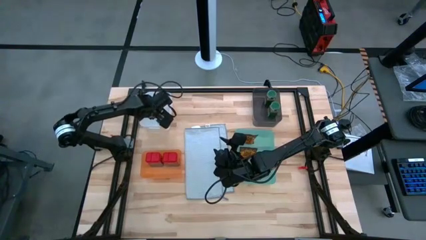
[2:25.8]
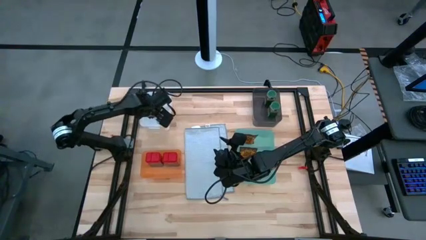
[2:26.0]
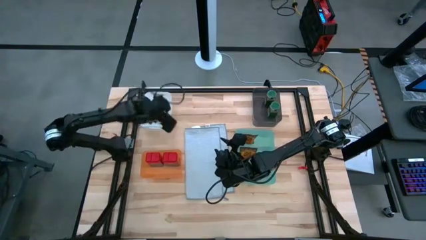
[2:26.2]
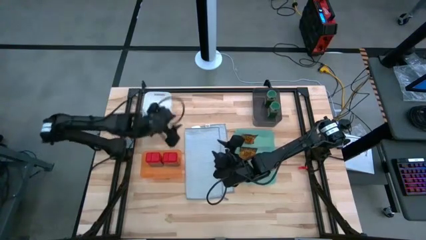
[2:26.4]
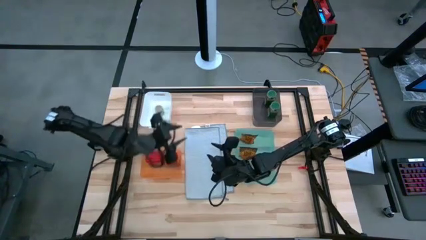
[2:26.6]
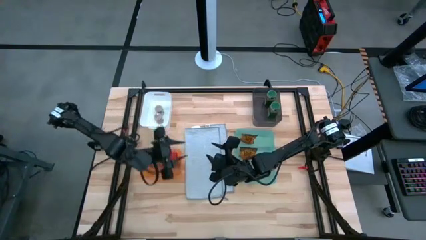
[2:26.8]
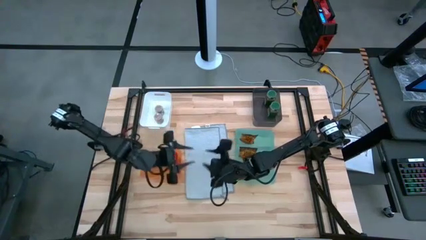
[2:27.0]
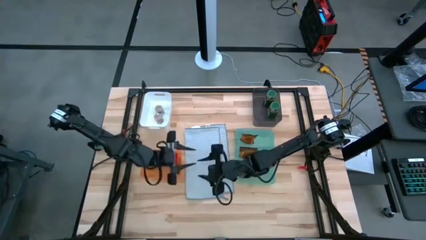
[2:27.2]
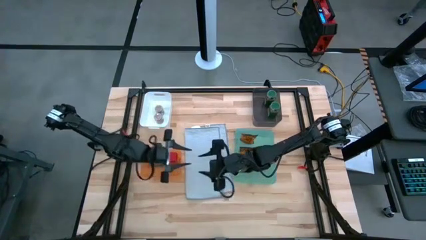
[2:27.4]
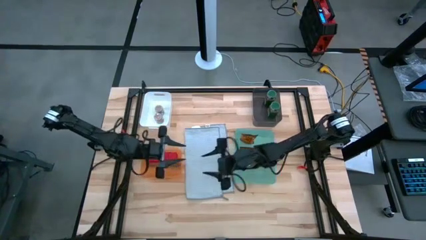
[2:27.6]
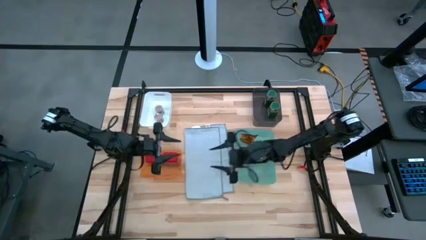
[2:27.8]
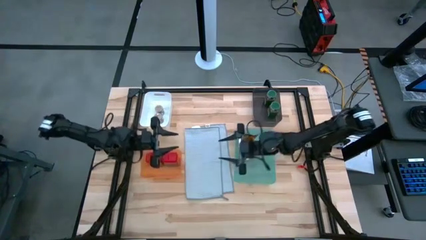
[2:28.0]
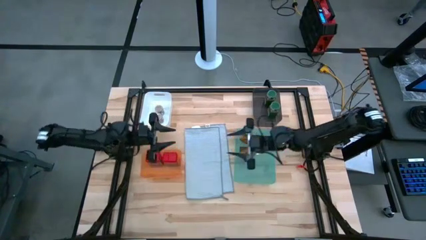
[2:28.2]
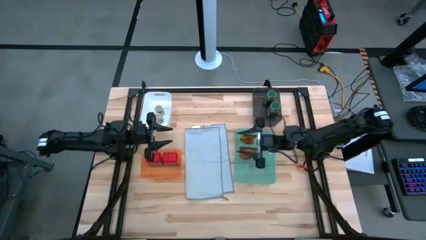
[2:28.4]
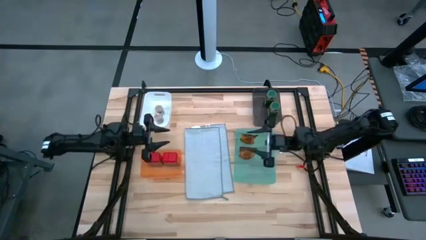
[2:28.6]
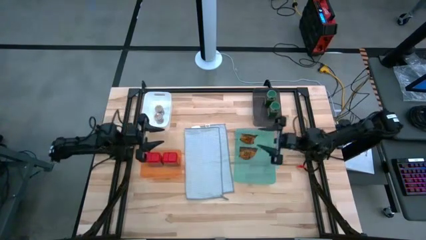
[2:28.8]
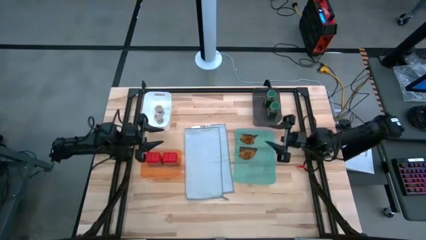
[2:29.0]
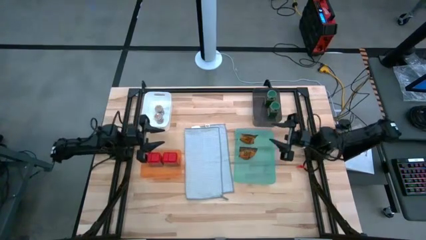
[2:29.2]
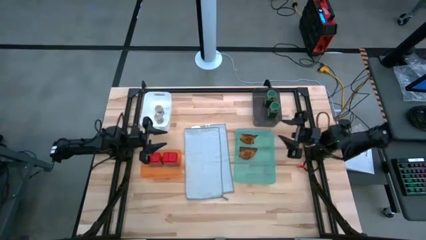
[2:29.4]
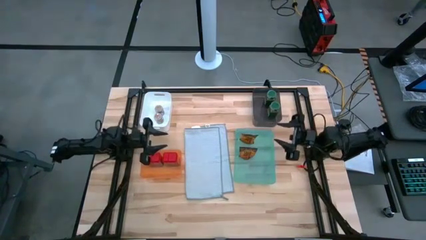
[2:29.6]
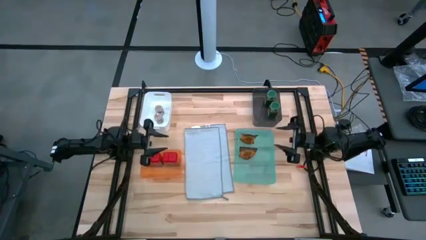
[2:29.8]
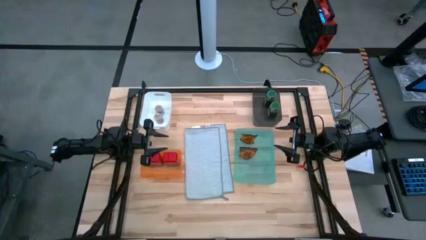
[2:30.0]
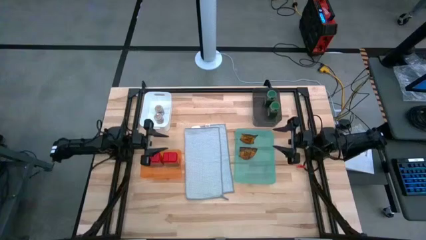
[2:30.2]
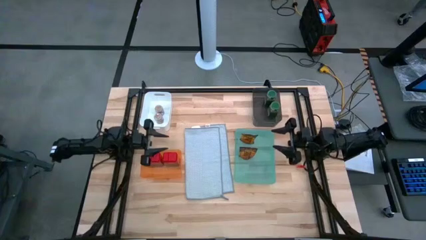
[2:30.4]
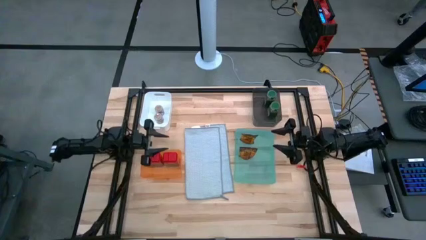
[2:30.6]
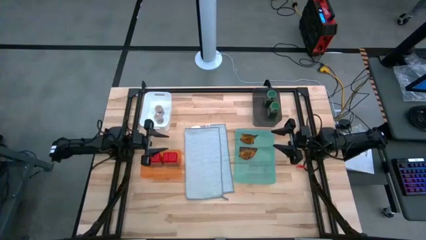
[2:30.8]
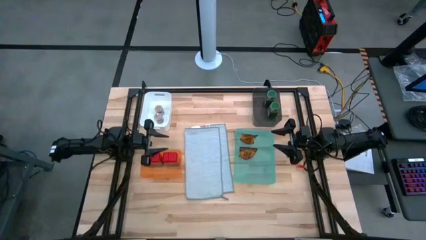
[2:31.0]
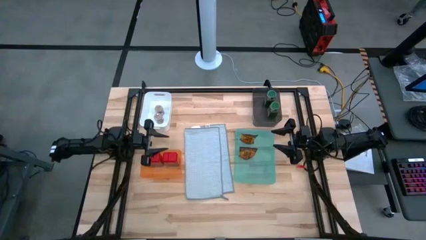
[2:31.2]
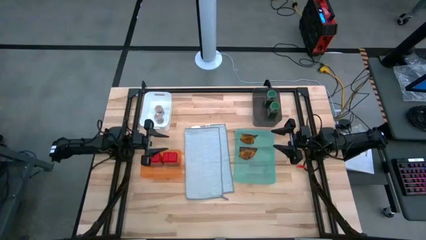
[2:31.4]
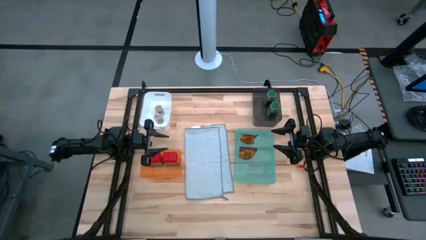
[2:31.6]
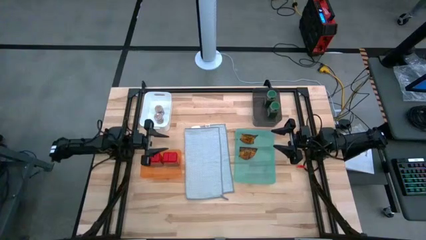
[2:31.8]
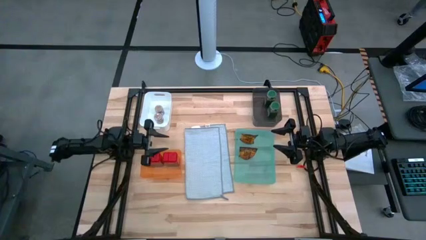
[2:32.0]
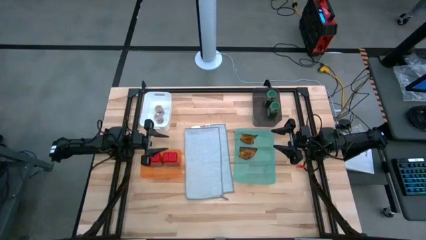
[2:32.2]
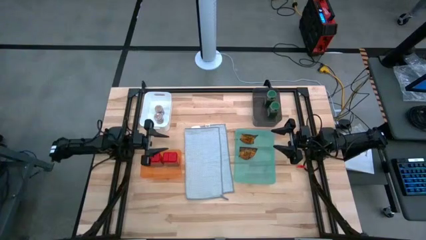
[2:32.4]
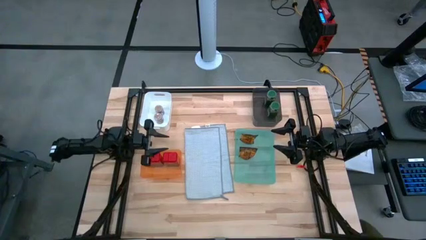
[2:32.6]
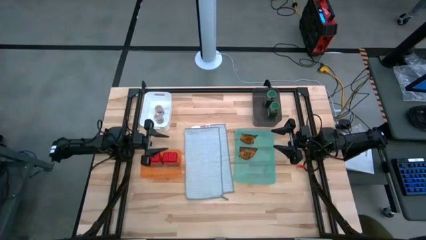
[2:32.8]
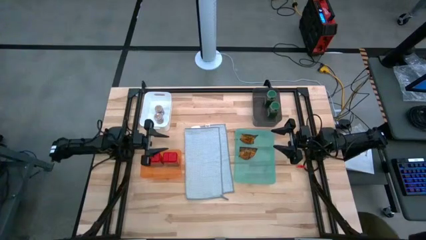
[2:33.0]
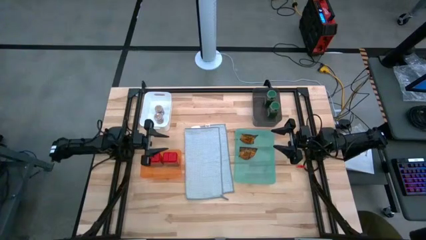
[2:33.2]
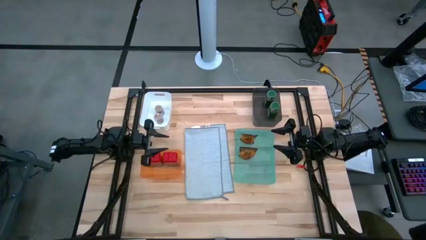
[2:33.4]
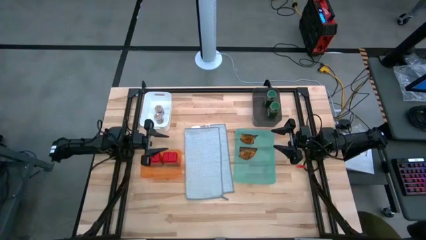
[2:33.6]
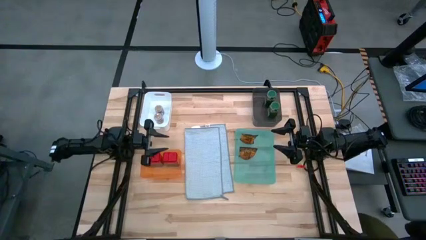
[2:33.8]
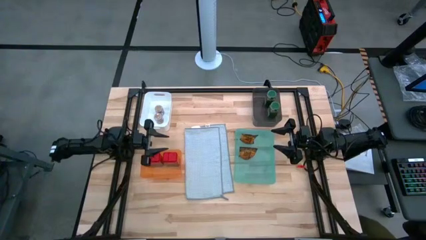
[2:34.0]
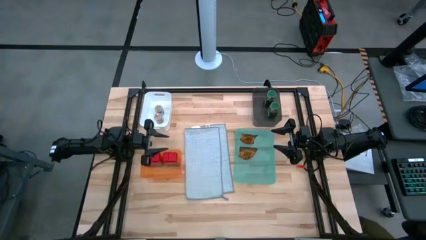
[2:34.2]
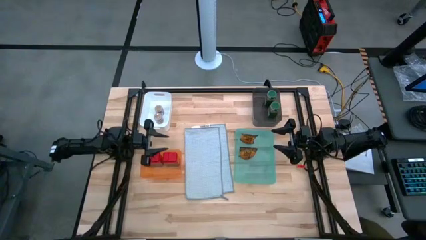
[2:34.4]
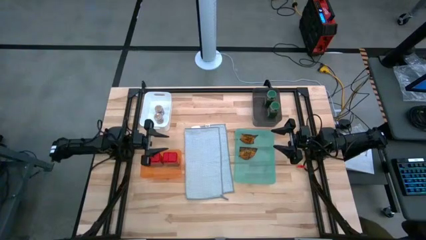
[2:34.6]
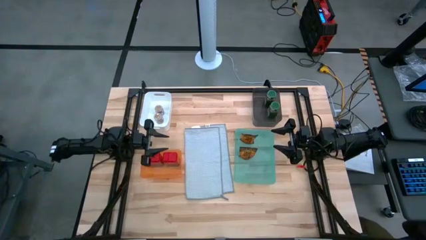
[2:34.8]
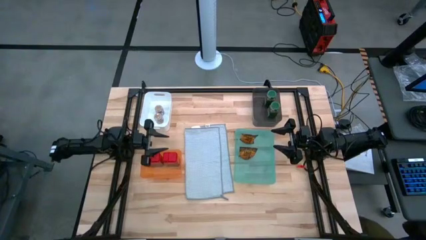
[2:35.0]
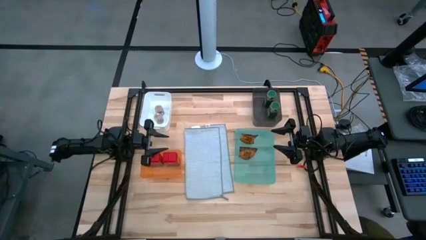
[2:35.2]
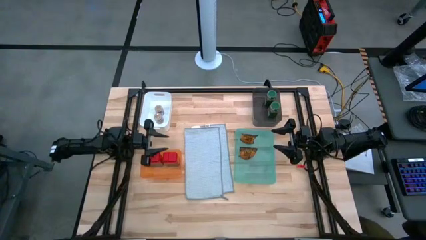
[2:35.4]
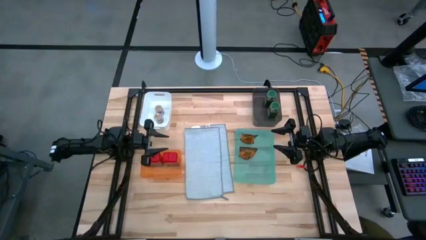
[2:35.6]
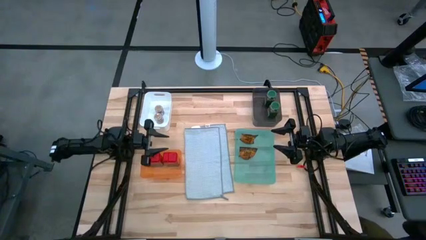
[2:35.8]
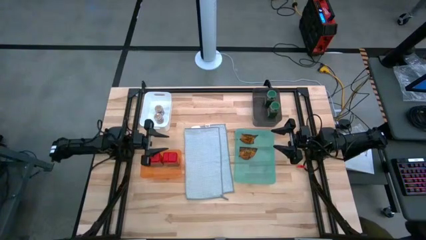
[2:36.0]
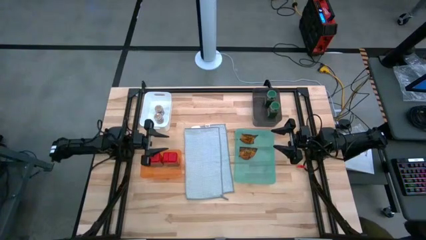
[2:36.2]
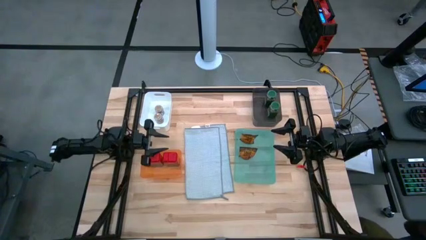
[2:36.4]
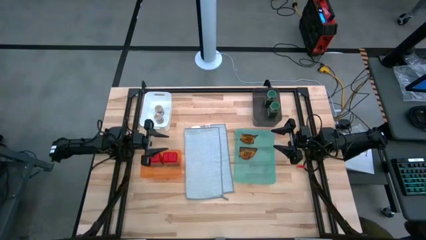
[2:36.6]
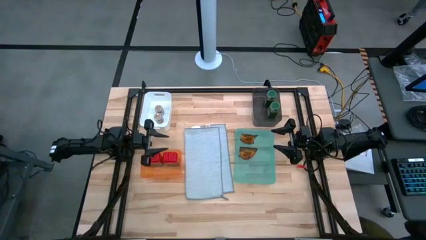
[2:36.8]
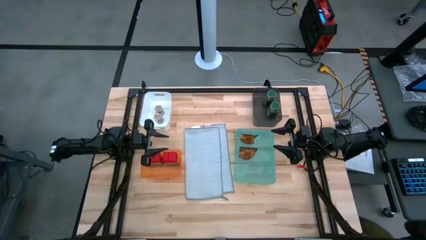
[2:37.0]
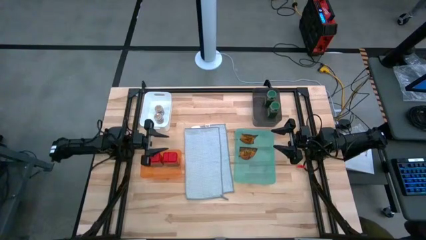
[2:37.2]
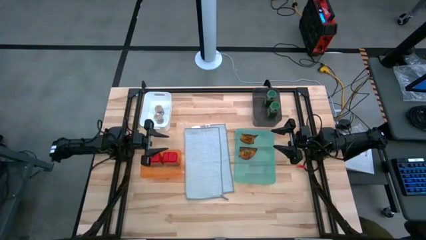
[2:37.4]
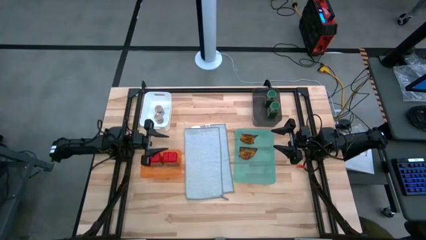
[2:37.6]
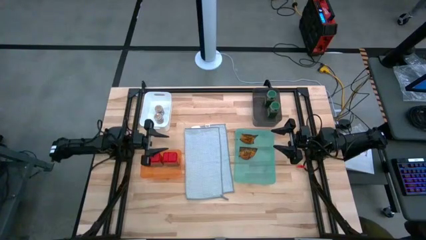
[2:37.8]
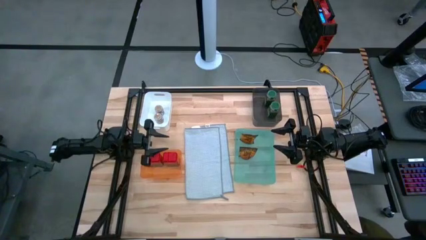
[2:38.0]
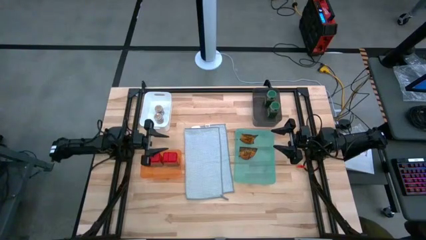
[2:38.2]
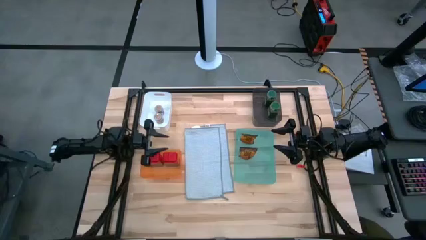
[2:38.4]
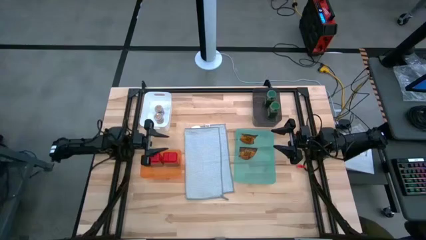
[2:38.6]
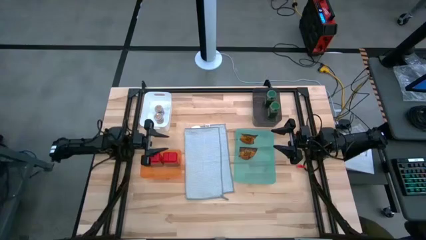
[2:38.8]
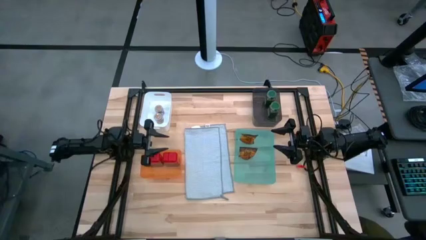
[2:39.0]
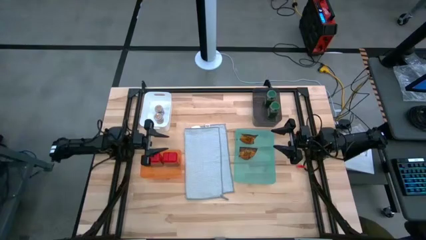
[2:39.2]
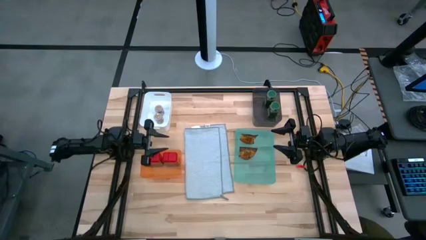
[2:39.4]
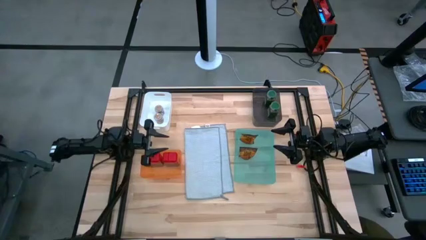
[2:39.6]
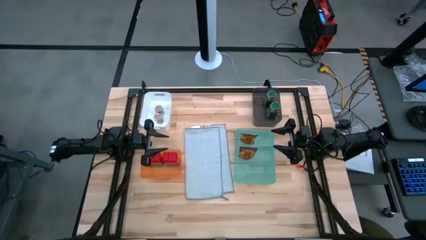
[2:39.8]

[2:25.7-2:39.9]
Task: Sort spices by type
Return to Home Position
